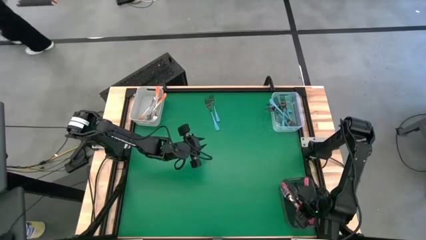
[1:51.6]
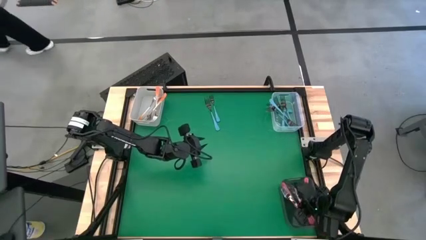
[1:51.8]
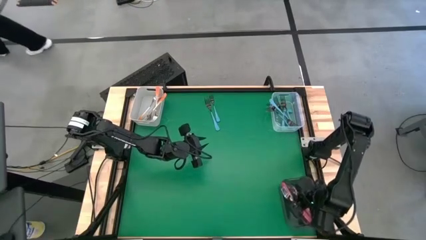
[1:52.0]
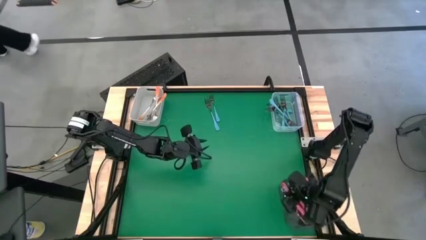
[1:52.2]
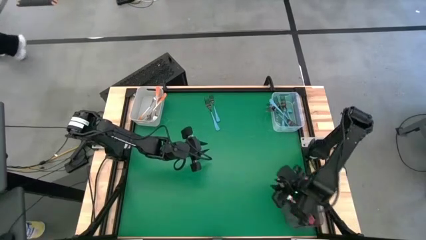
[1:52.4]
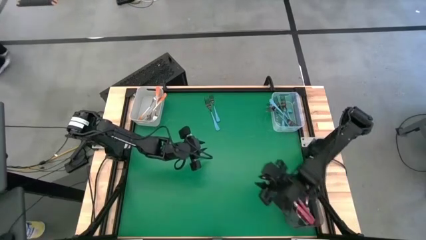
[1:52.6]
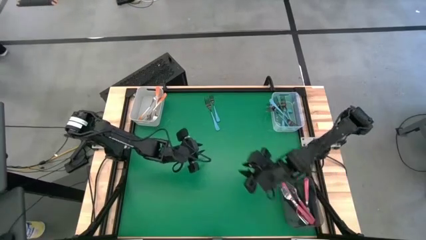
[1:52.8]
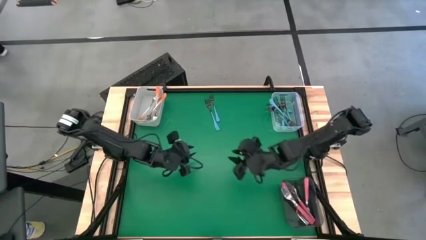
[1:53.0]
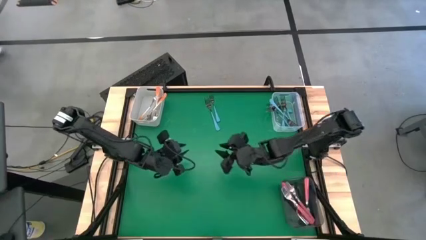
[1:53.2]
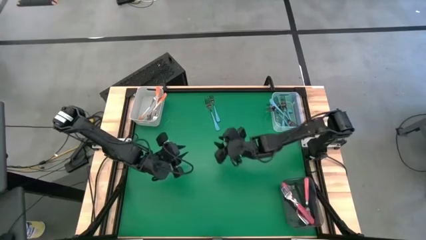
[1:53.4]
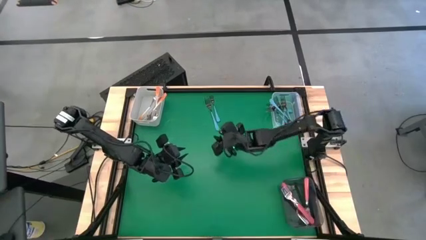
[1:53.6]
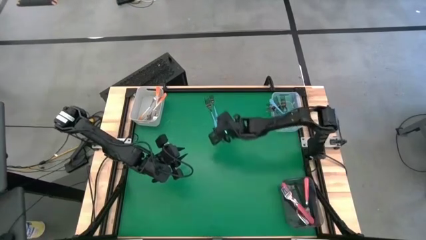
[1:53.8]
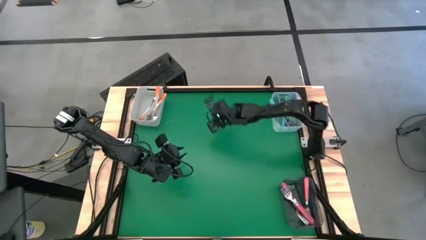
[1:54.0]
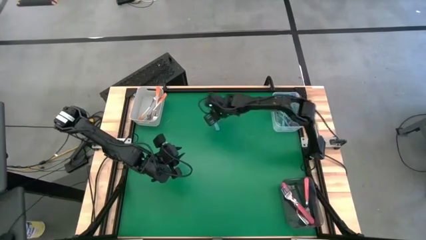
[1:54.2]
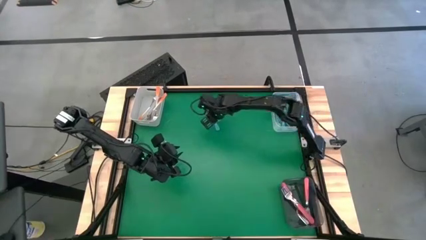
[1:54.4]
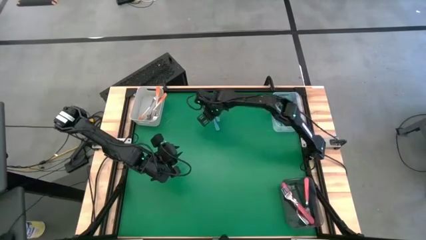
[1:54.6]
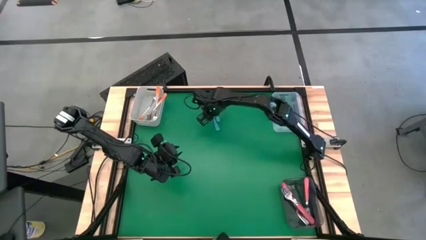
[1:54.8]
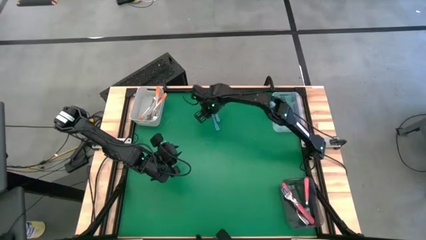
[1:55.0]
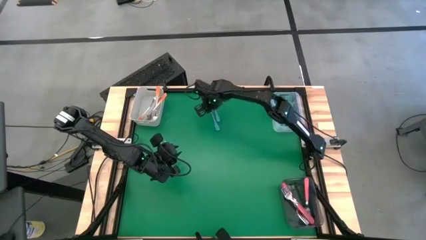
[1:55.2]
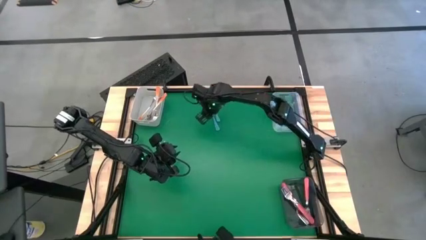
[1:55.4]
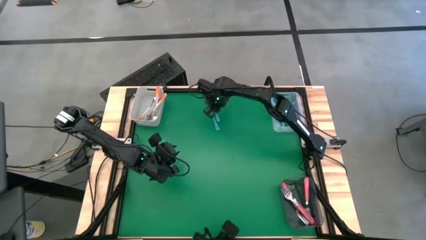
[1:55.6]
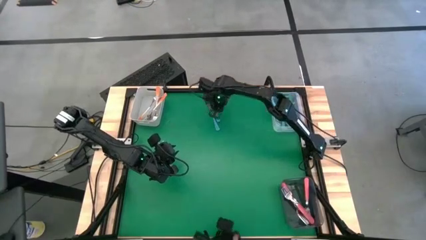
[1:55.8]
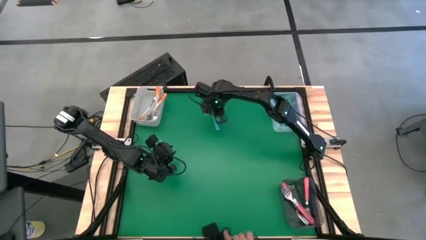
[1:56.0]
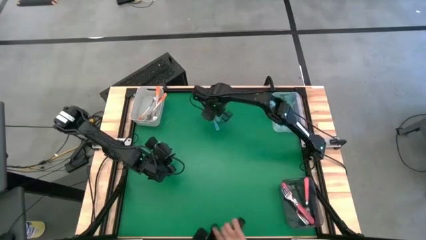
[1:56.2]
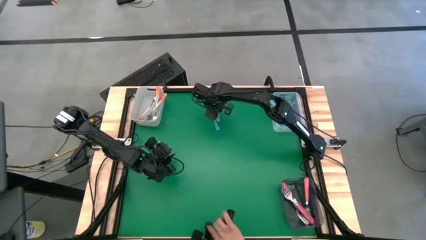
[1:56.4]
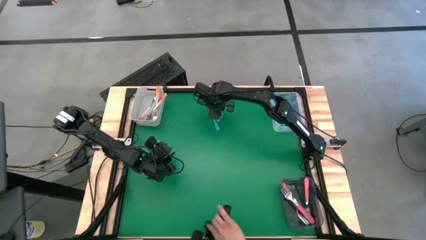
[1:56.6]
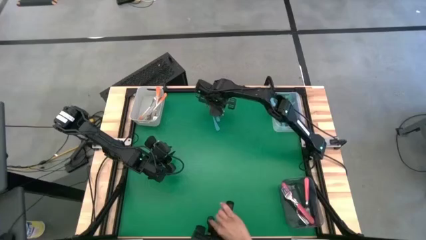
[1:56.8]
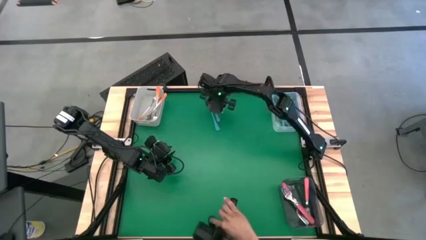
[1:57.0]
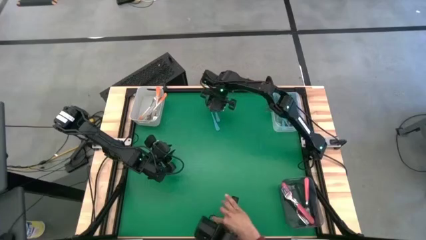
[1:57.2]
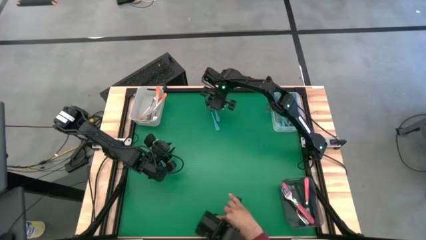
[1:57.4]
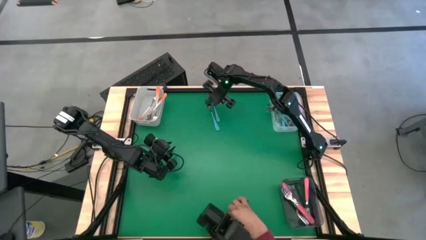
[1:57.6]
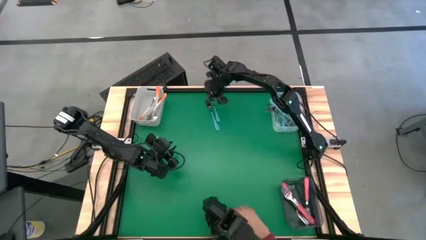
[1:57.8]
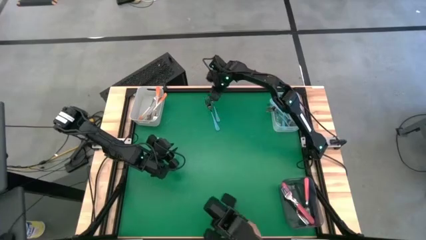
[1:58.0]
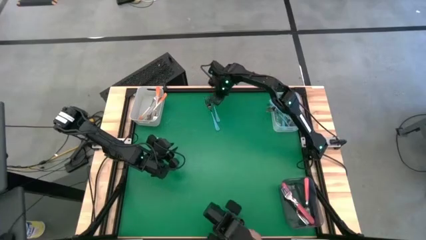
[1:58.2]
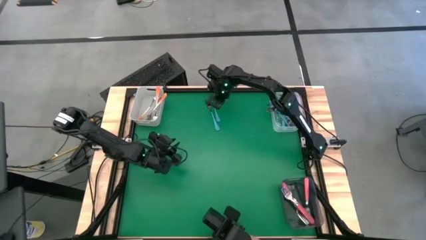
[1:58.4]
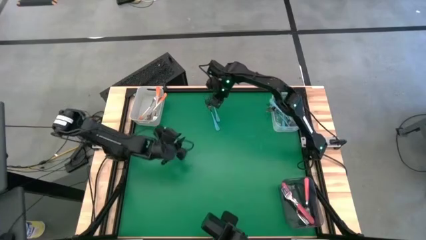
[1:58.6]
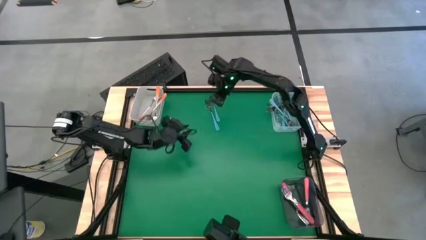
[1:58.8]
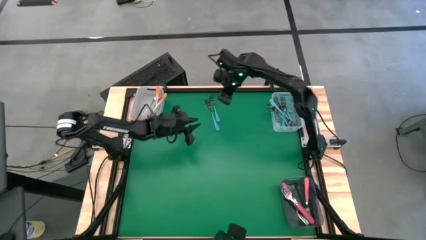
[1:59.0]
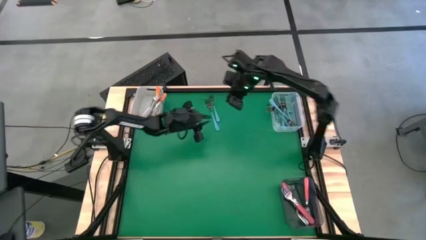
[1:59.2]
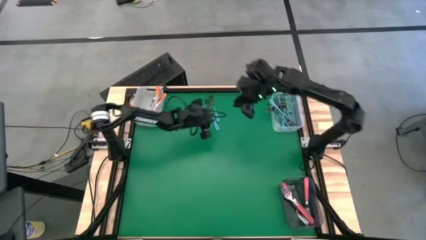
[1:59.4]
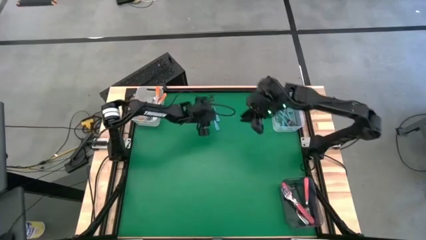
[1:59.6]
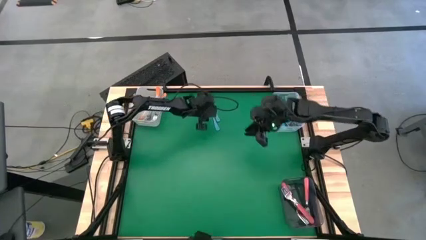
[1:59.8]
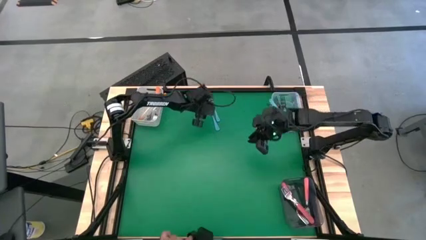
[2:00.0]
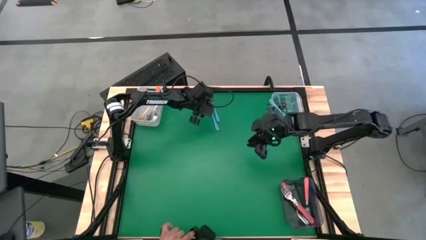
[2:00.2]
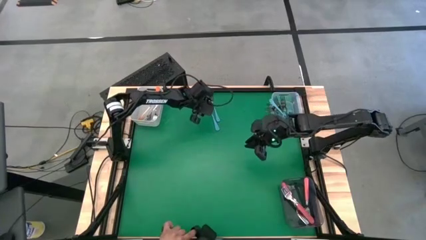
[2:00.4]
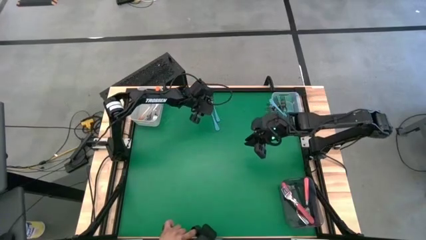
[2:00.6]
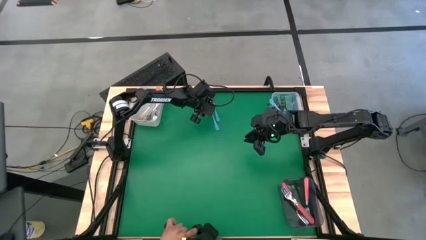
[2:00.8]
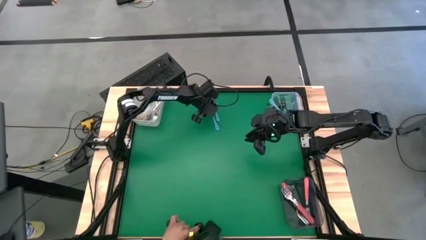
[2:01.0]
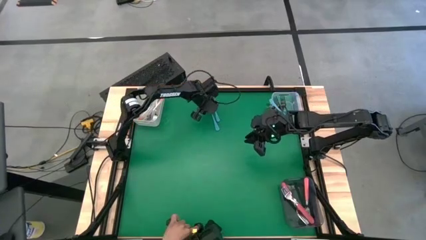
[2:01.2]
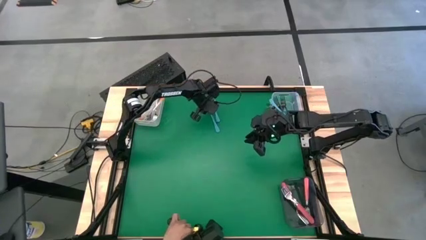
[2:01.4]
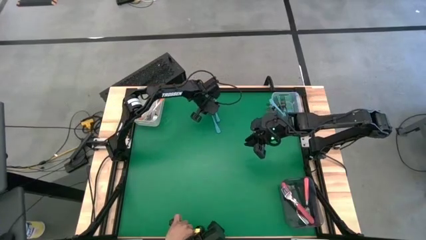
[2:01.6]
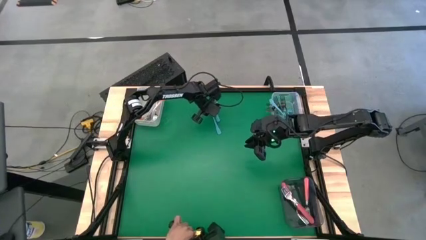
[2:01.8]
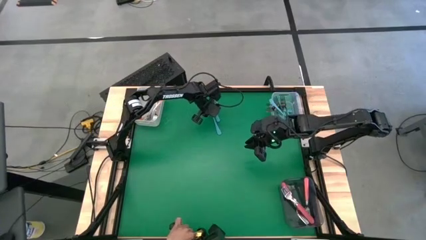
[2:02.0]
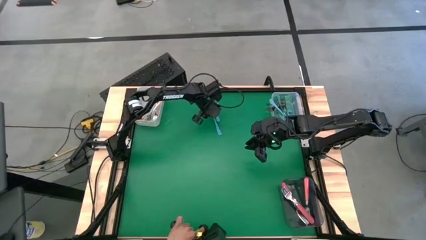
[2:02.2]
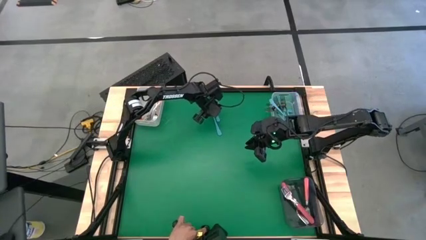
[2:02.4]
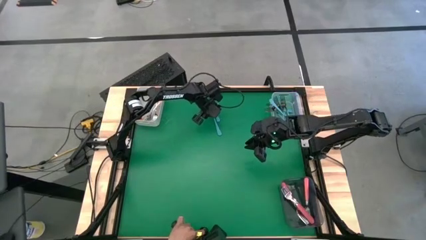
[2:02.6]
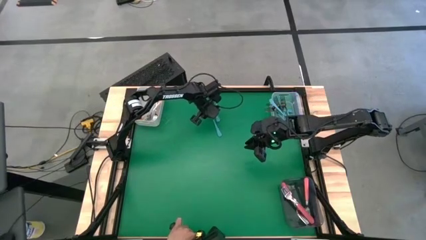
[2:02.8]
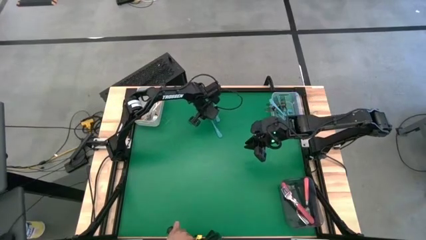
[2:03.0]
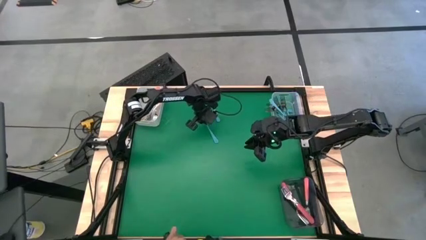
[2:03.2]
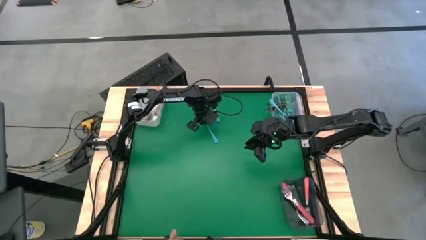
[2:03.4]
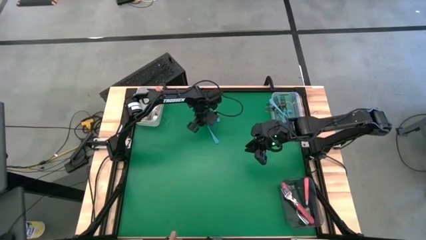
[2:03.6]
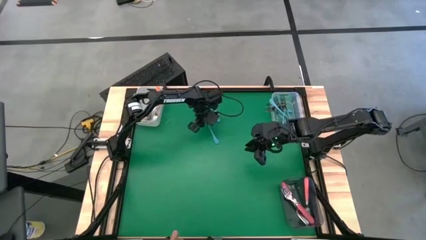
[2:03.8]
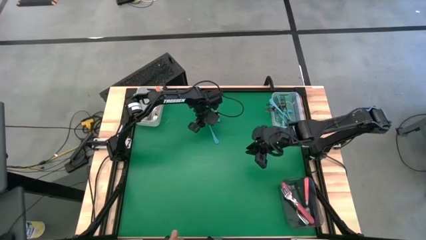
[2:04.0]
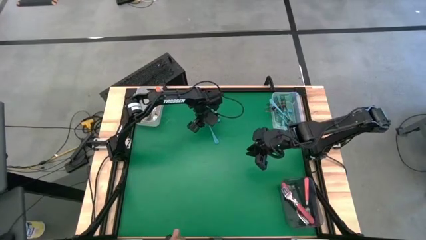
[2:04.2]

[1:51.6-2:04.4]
Task: Sort silverware by color (type)
Put the blue fork into the transparent bin

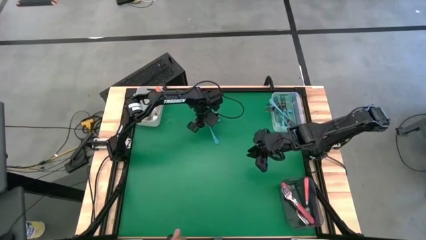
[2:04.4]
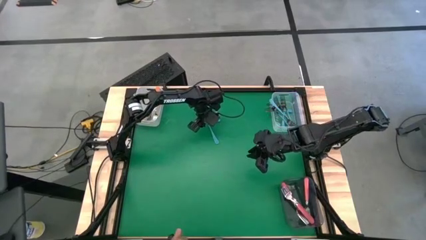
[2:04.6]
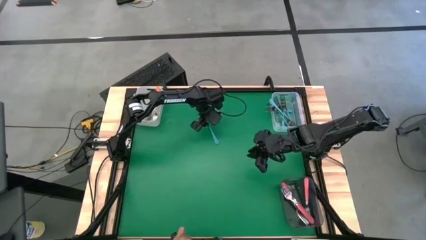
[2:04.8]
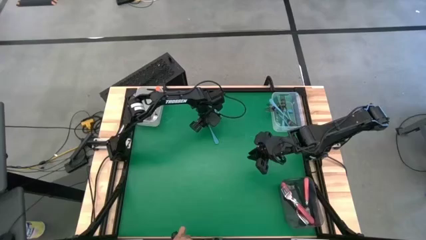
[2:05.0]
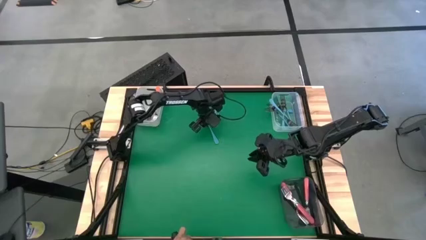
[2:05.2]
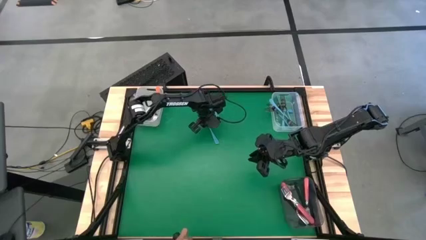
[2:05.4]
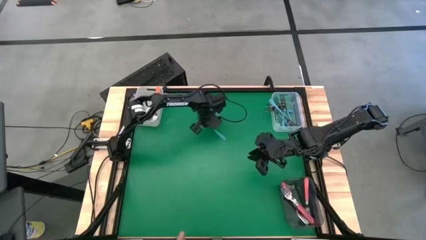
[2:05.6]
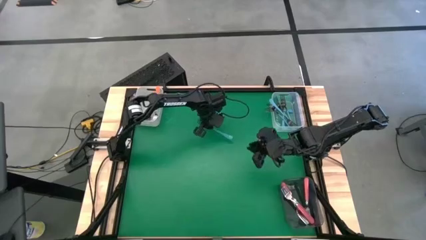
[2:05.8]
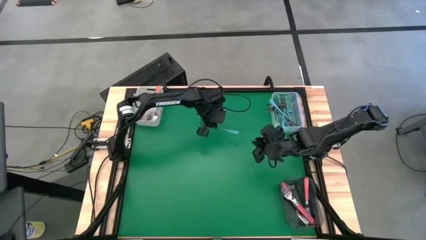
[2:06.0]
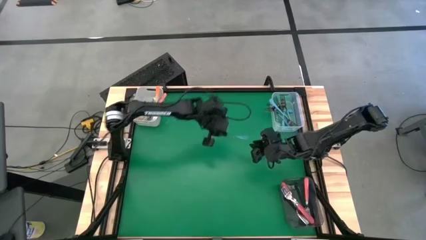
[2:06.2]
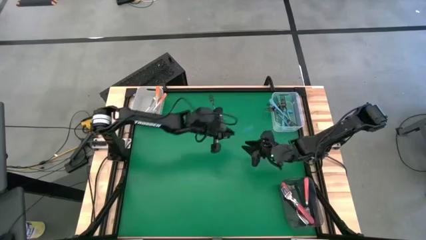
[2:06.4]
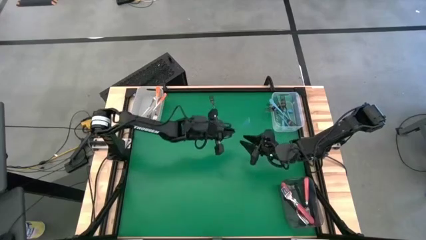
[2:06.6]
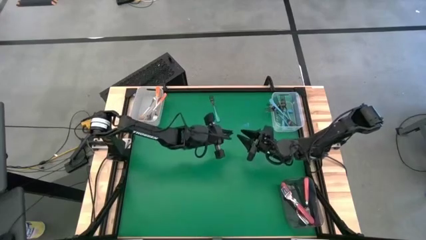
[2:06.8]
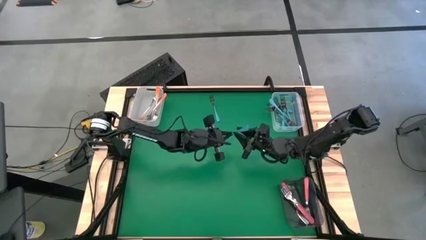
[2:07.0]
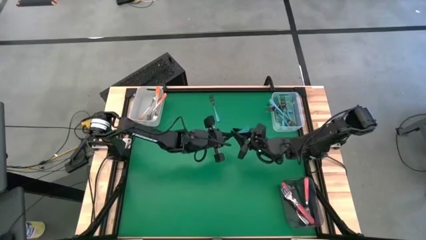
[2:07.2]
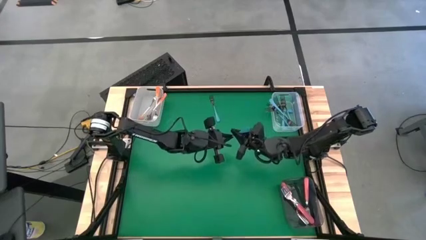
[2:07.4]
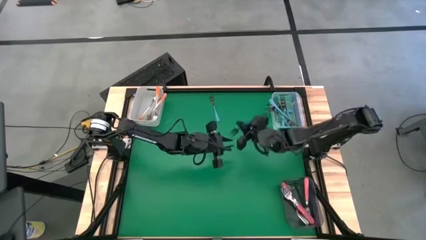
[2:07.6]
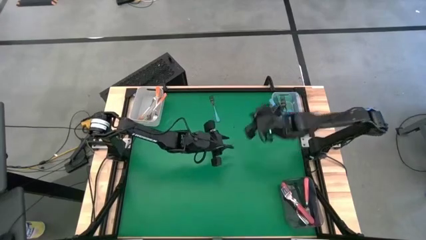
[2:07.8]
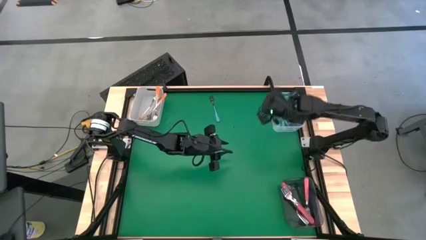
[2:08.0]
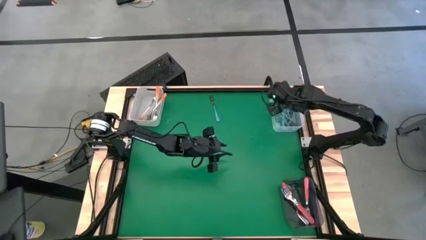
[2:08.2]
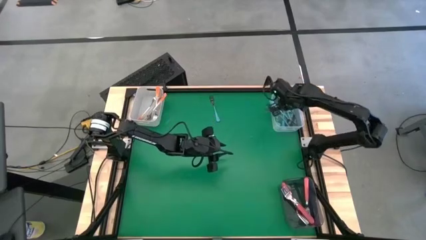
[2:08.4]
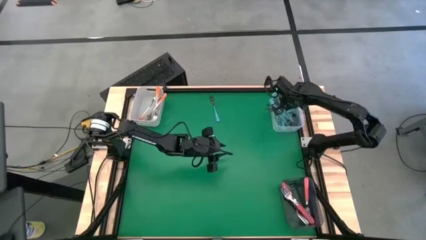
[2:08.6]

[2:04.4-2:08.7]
Put the blue fork into the transparent bin
